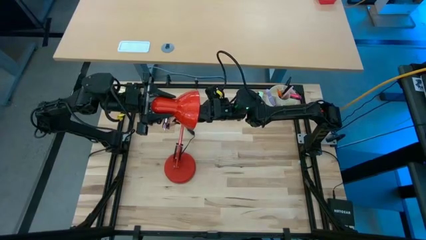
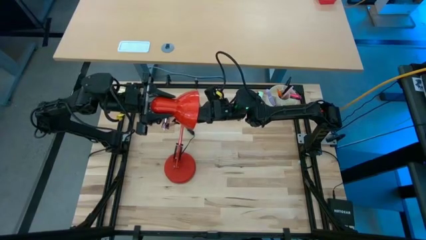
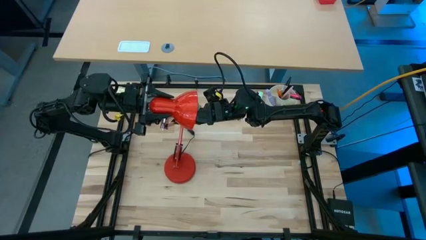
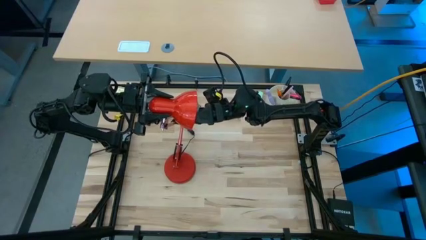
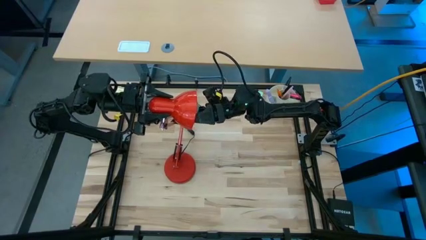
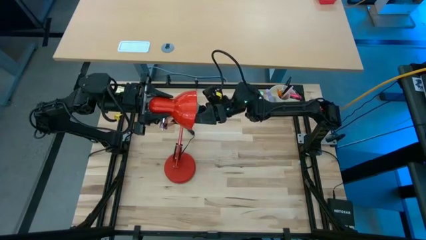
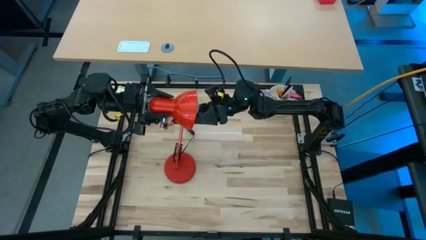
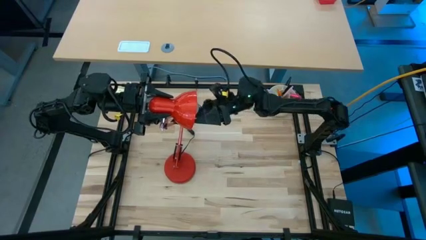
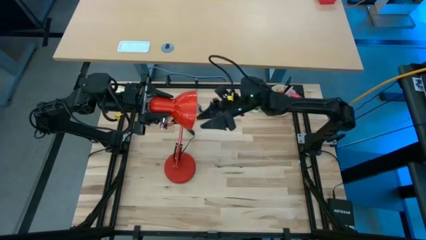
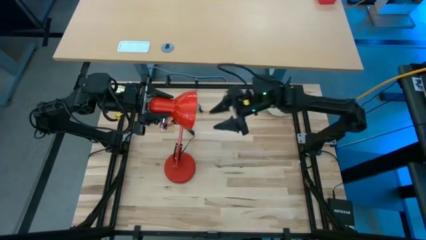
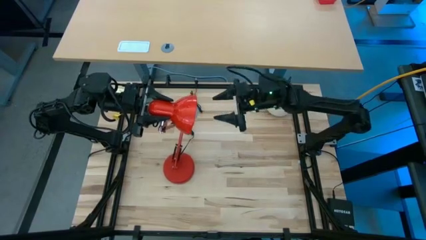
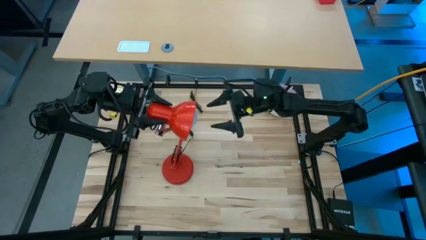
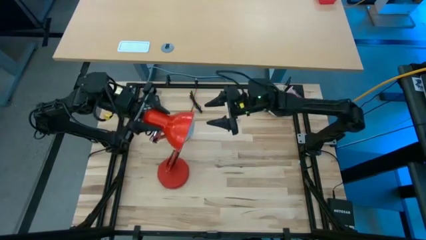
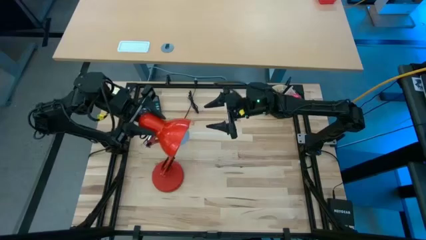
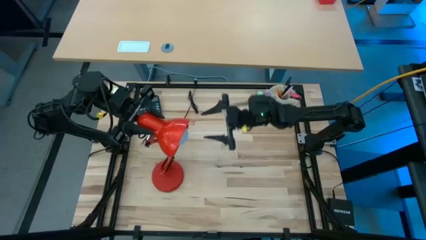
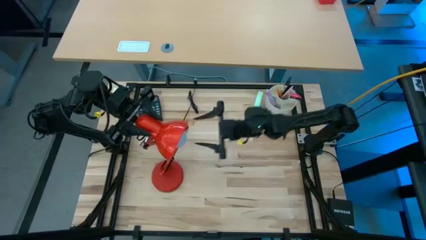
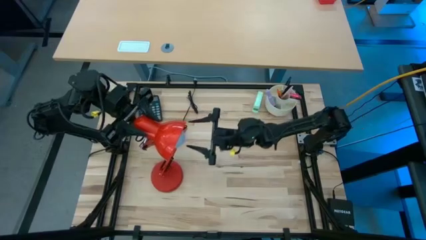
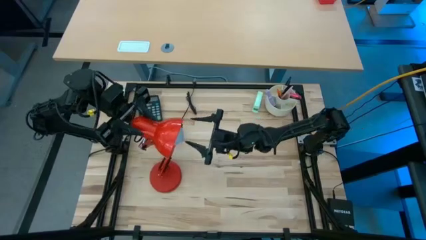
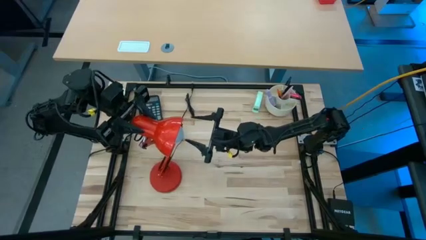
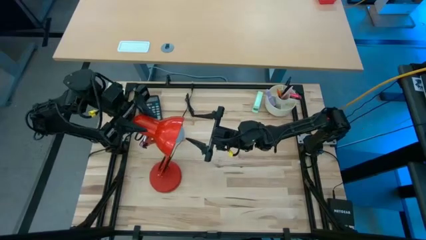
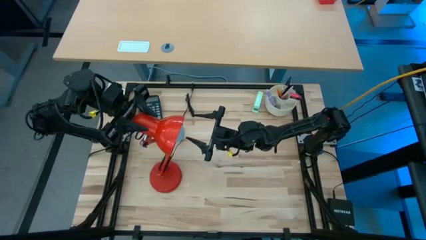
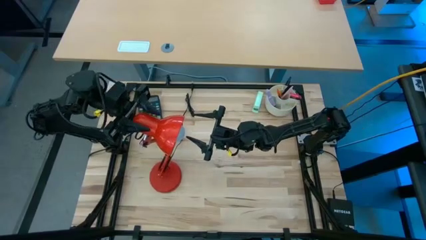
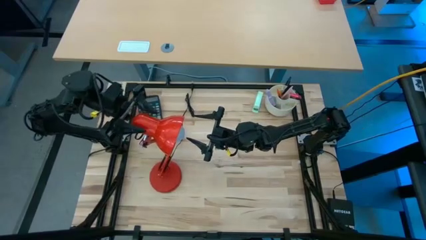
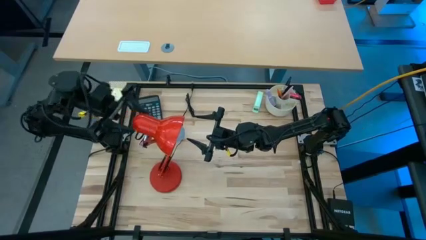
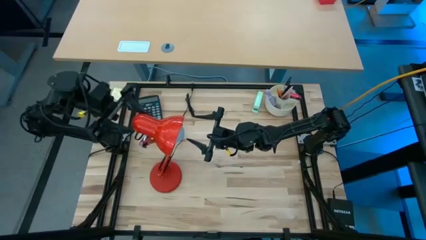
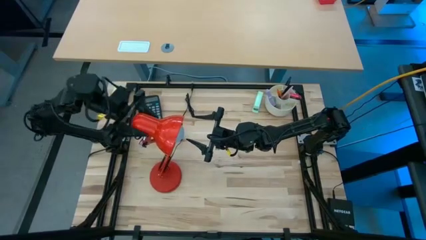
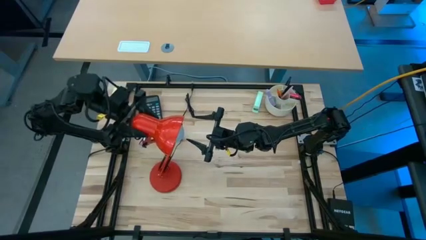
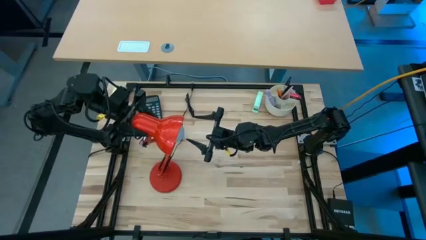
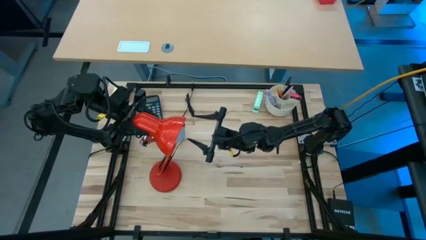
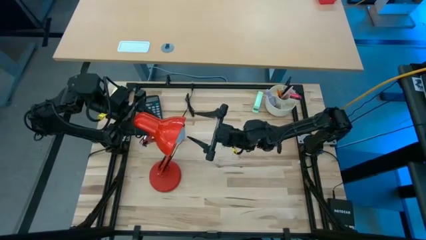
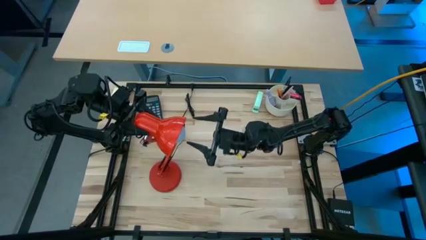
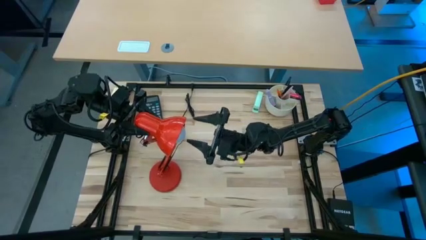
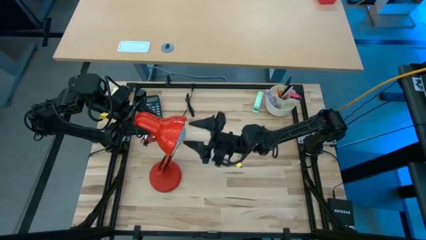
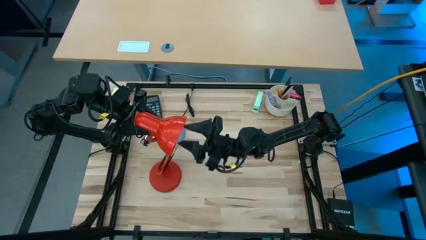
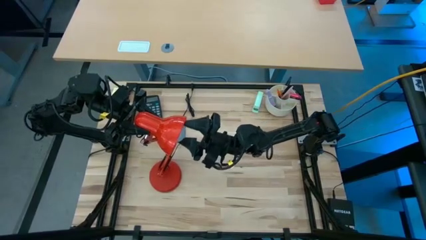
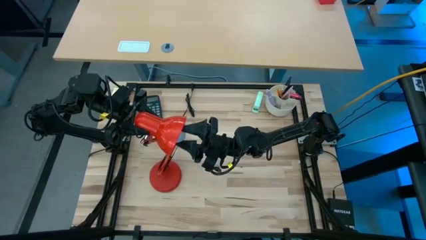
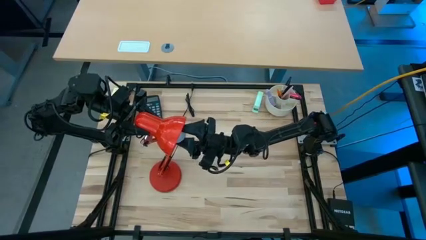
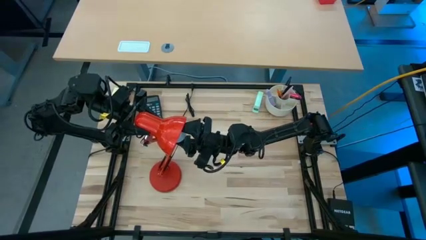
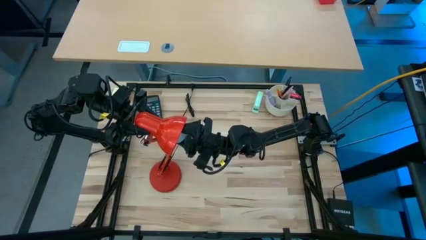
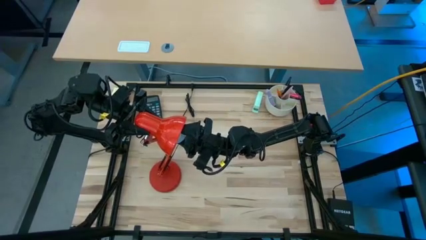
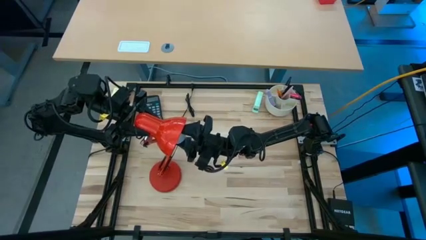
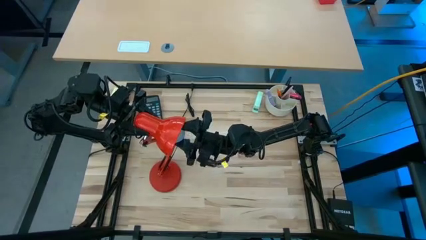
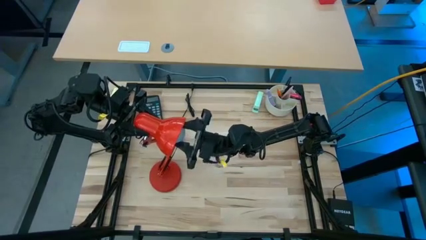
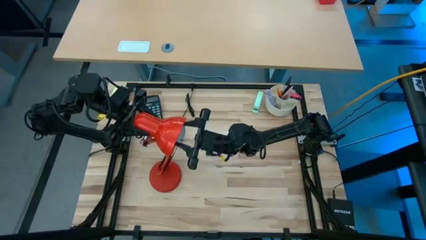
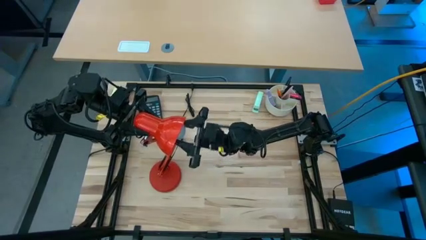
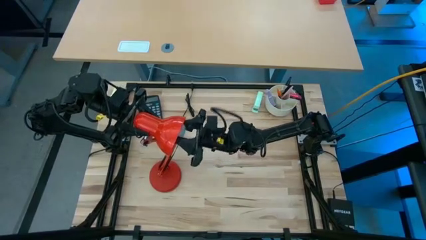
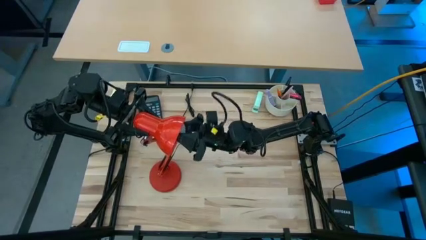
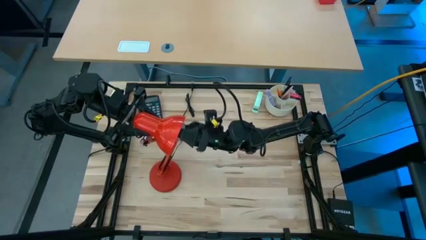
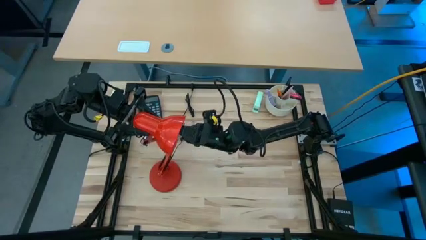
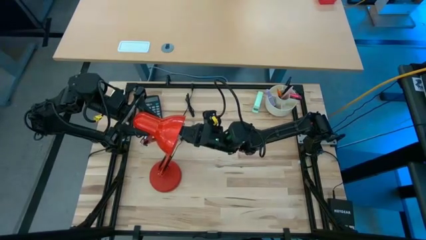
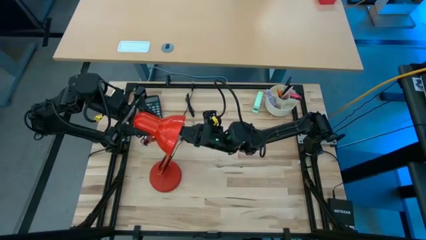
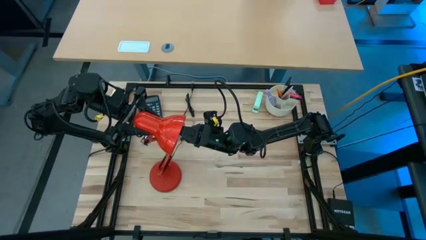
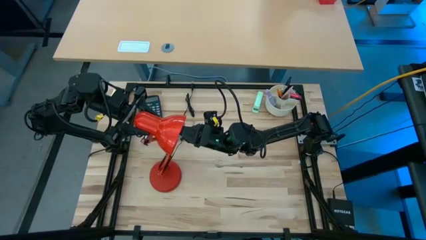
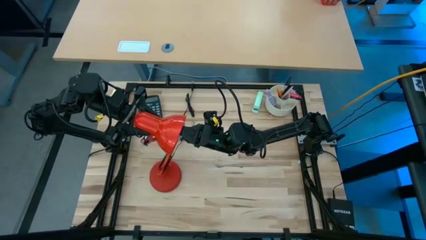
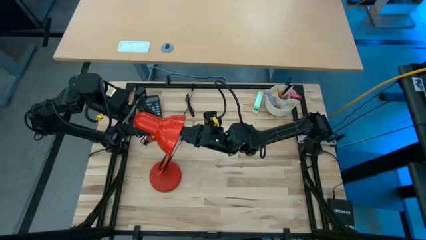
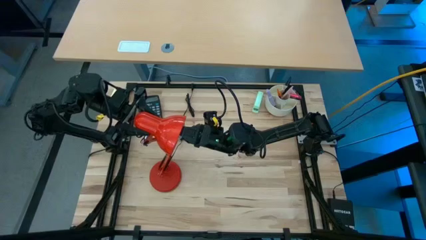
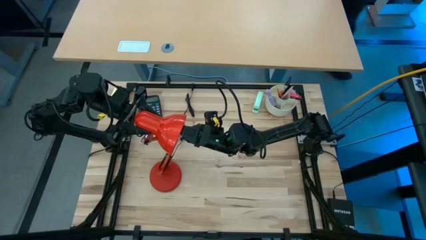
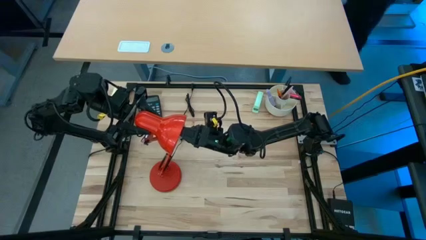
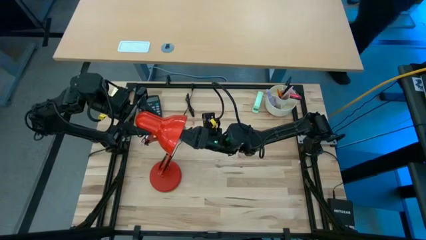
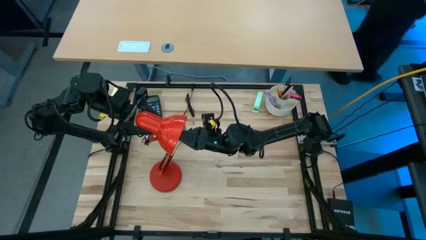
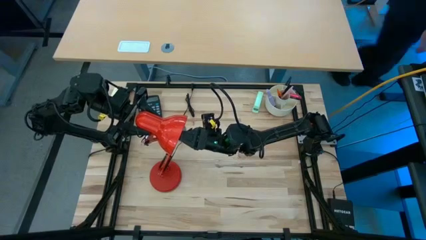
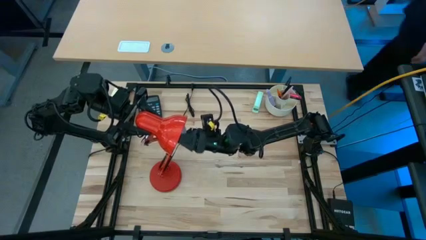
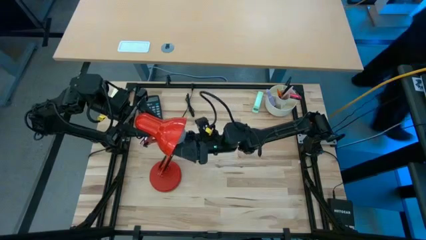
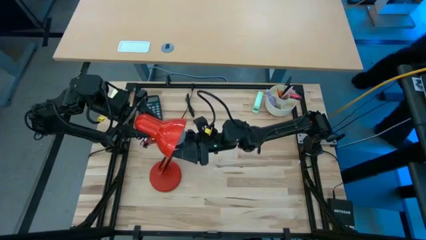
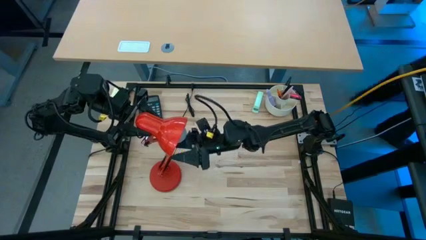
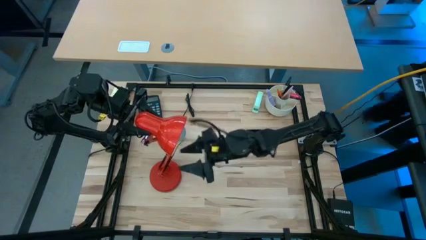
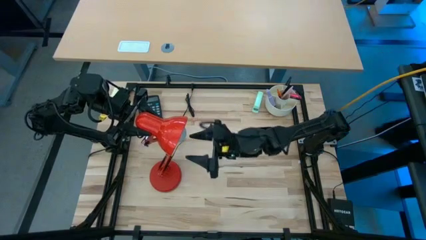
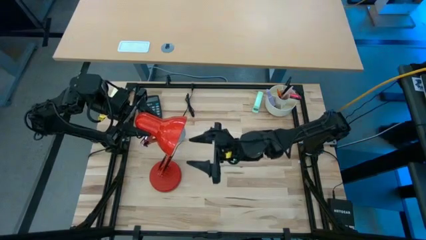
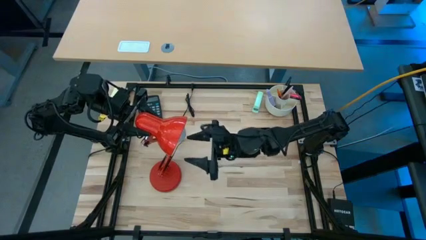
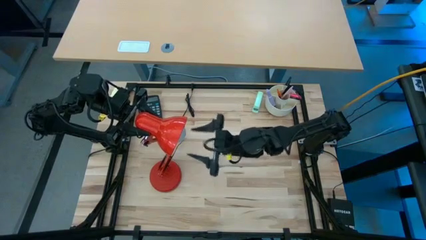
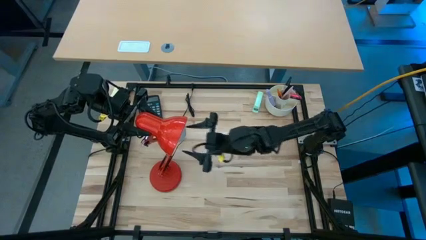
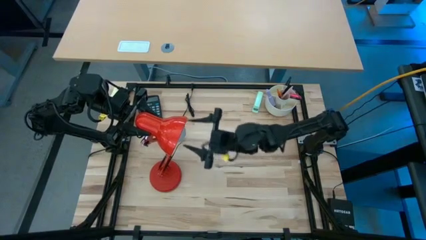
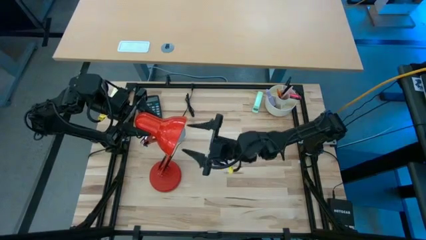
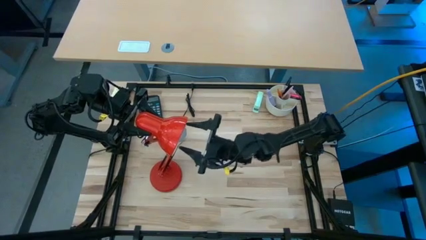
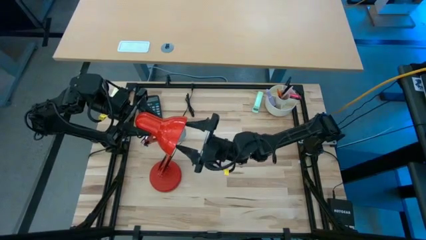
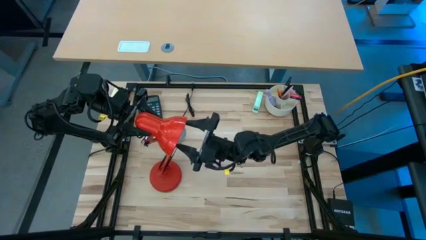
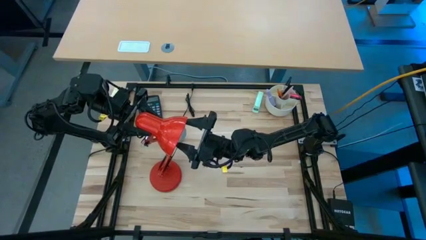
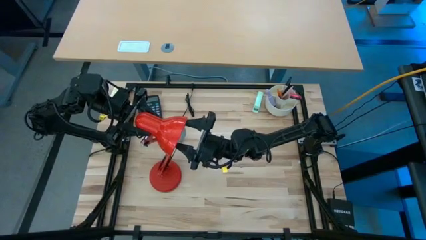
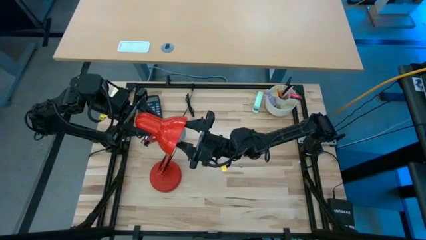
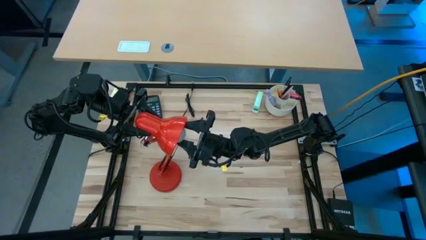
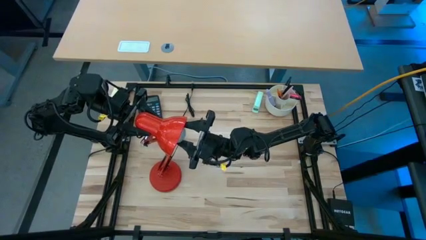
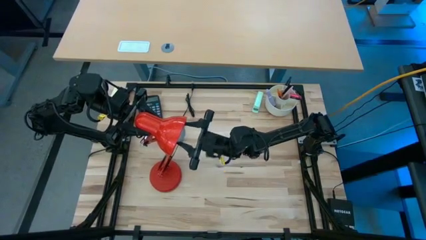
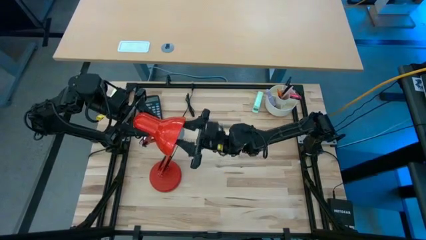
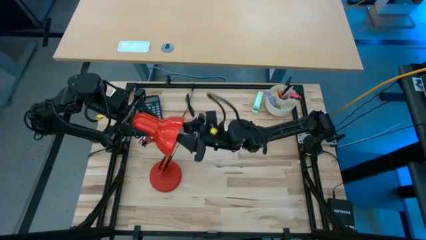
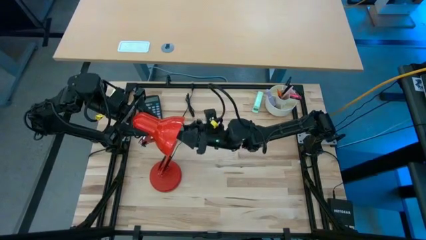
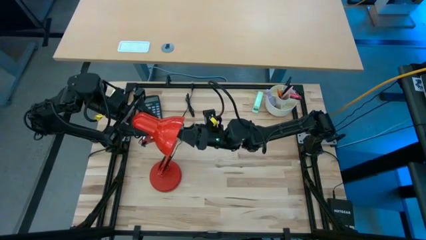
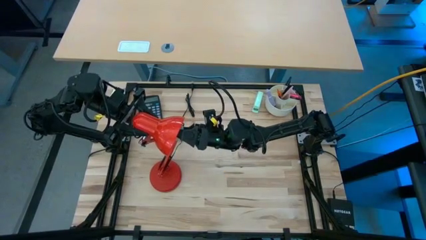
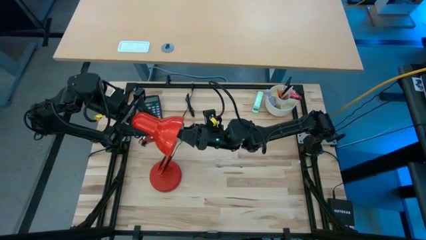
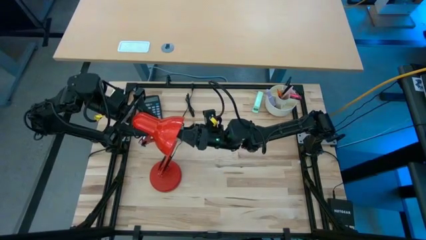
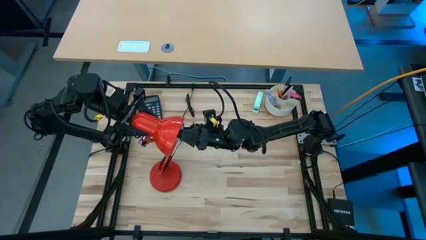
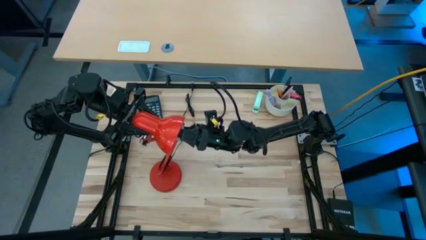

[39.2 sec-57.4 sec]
Task: Screw lightbulb
Insert the white lightbulb into the red desk lamp
